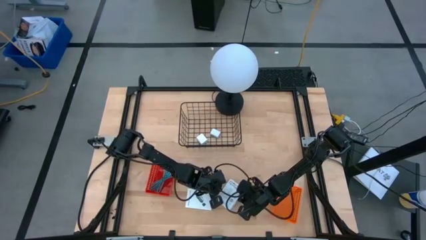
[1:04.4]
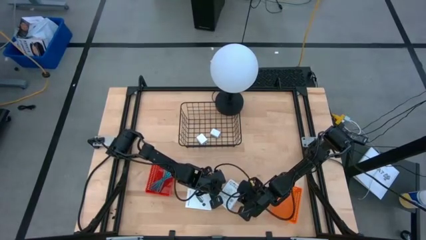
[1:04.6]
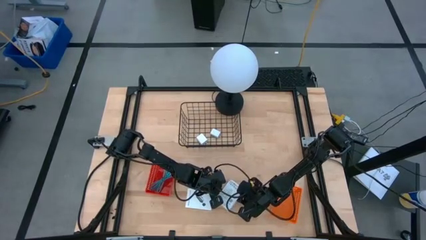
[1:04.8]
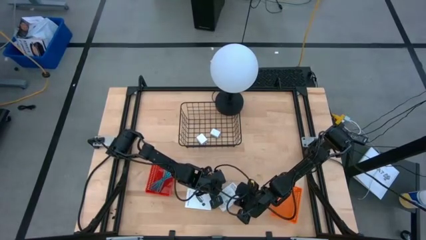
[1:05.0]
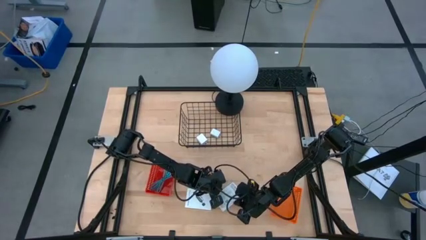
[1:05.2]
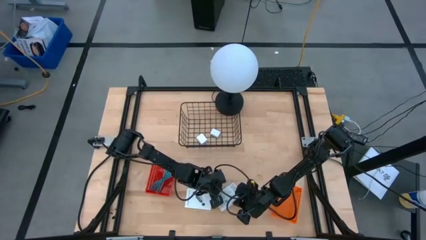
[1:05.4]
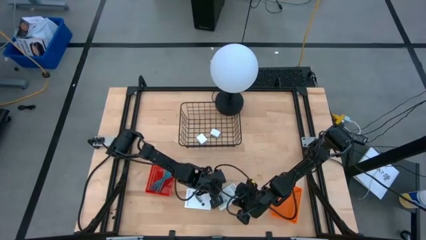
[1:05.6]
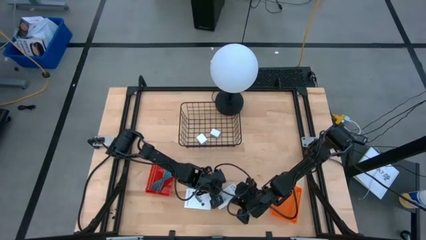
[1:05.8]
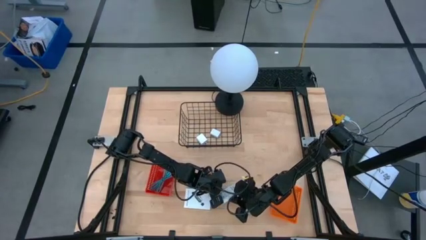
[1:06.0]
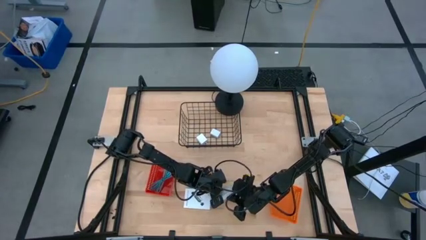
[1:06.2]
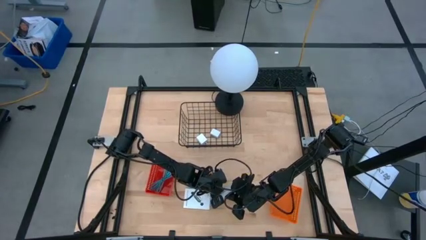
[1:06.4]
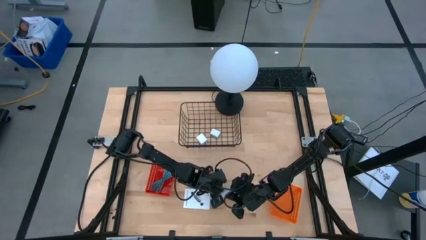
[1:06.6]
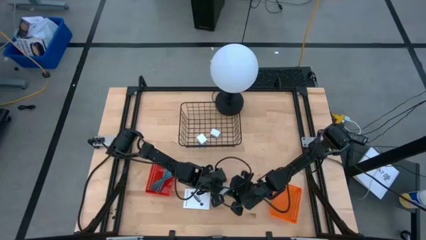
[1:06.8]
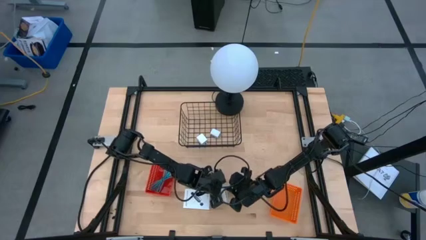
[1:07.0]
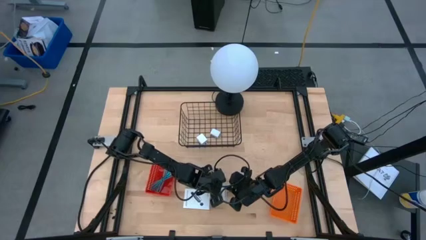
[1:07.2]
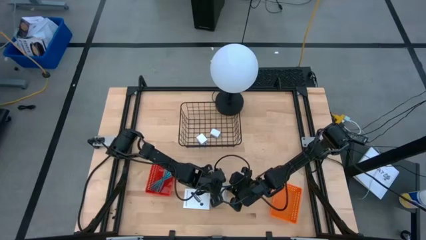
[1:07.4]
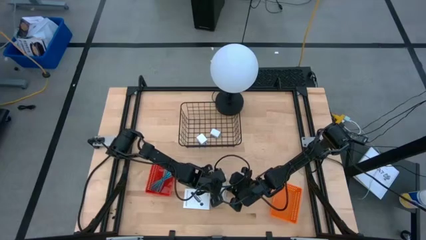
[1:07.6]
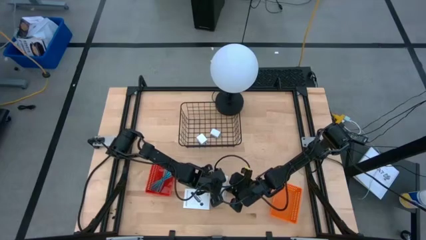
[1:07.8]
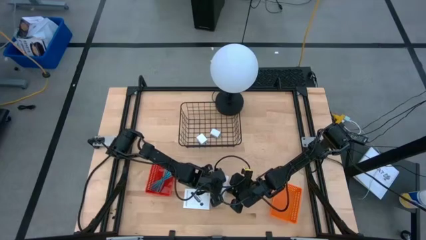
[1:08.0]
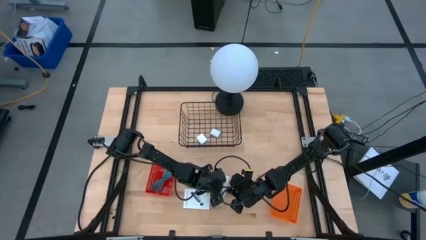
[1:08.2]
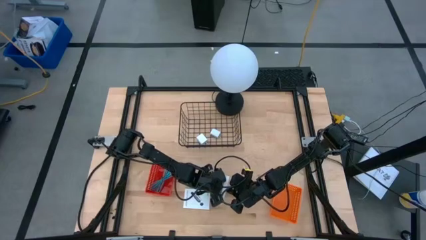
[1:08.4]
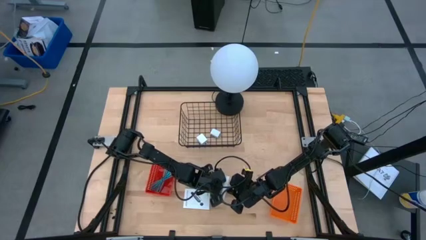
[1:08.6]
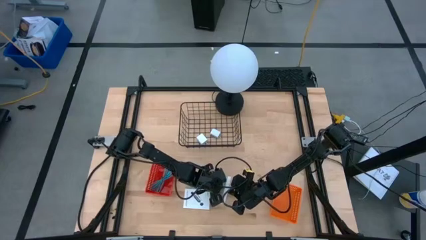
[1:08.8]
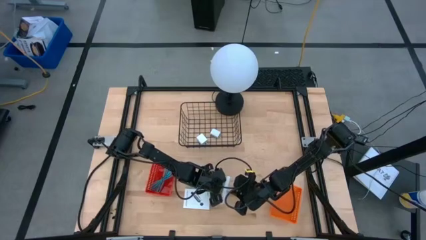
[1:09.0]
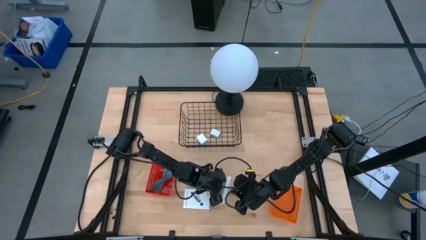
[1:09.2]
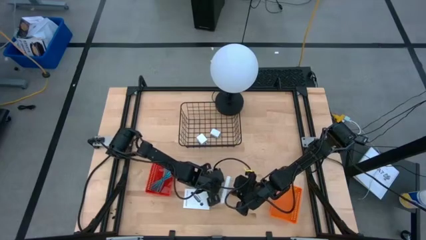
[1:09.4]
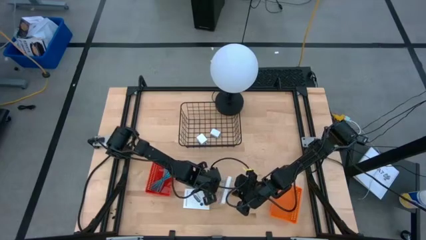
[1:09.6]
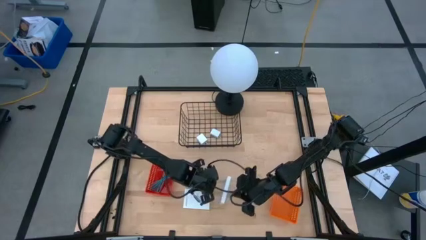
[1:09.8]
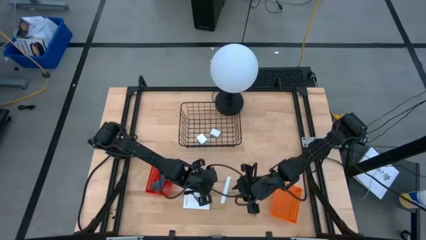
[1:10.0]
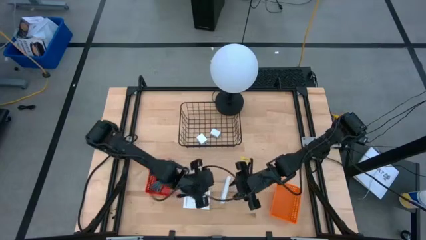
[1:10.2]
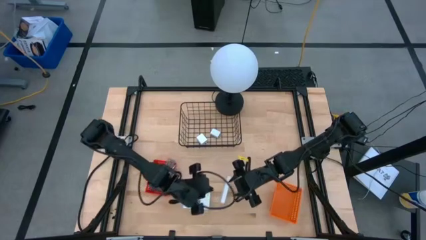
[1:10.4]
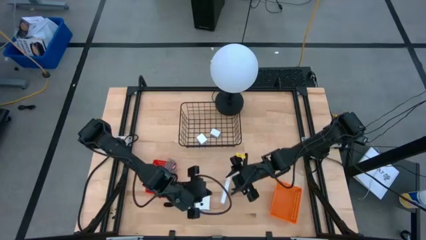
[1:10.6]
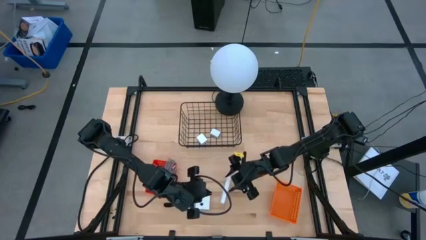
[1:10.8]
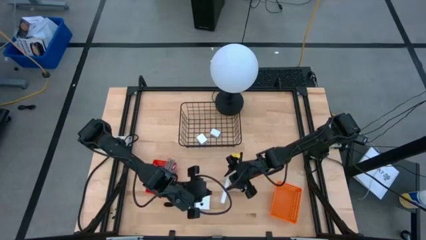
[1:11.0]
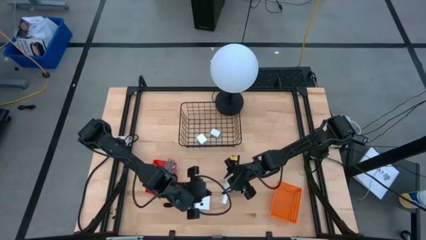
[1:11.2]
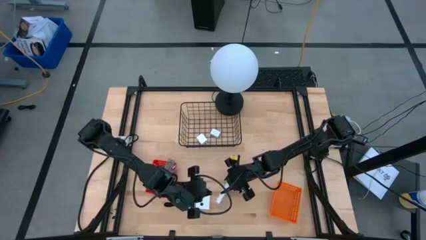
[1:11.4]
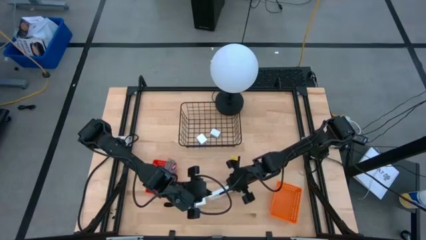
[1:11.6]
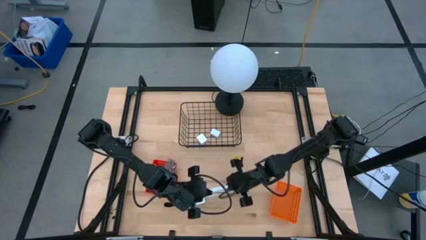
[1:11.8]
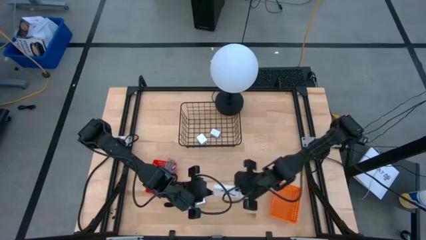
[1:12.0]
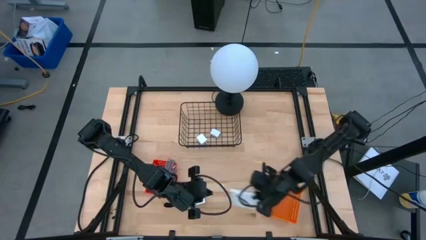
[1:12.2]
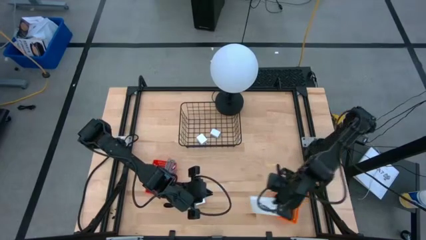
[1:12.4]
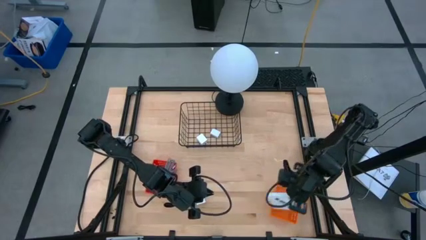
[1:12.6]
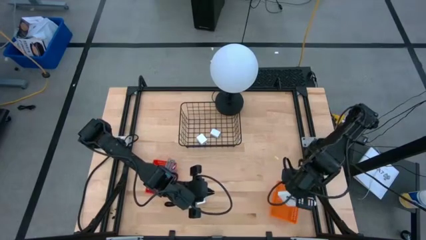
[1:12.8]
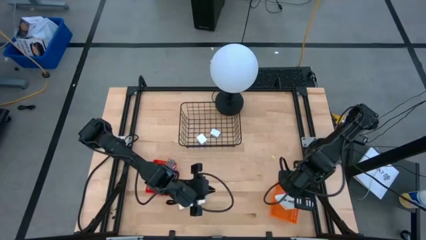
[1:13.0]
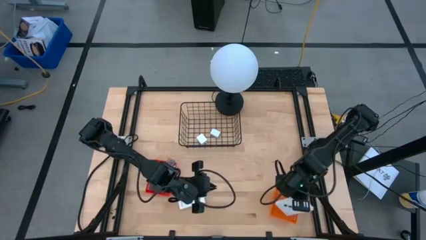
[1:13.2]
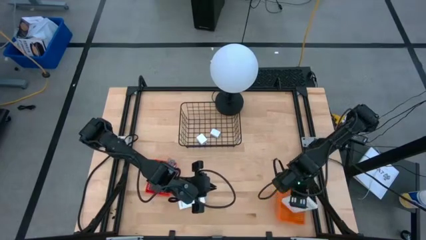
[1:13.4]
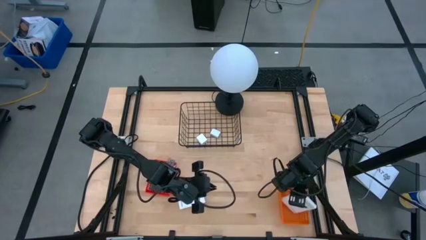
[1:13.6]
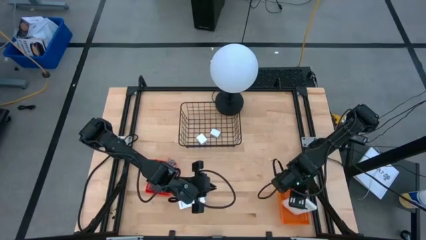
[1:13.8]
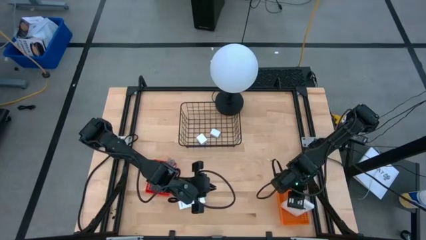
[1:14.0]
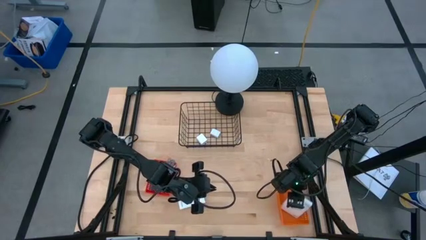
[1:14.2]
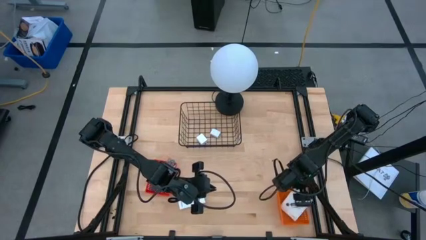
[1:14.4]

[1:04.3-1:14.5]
Task: Pick and place items into bin
Put the right white card reader box into the orange basket
